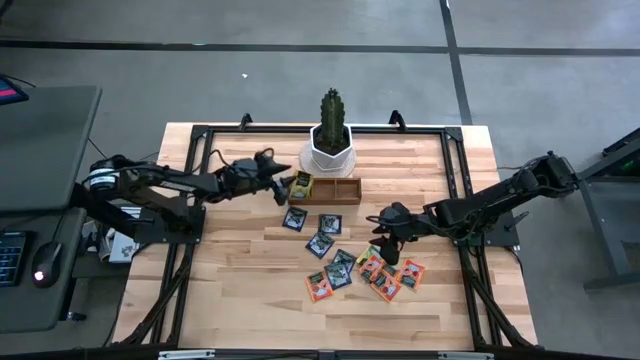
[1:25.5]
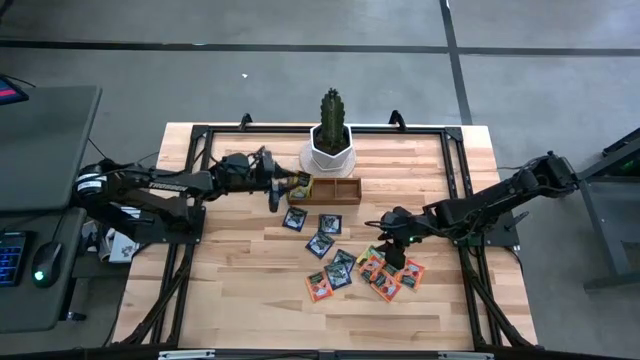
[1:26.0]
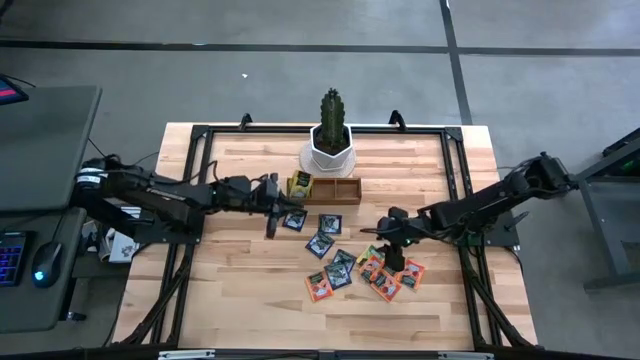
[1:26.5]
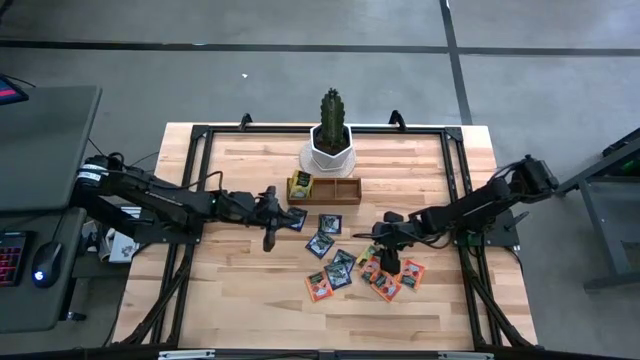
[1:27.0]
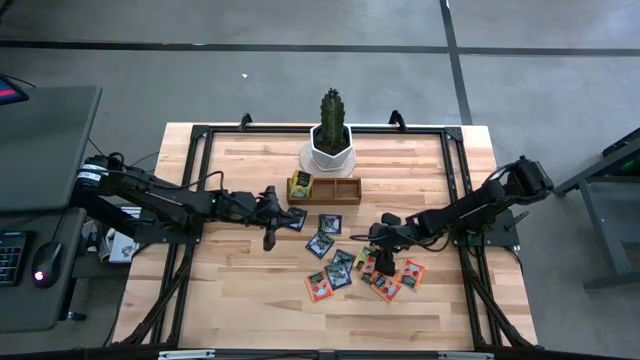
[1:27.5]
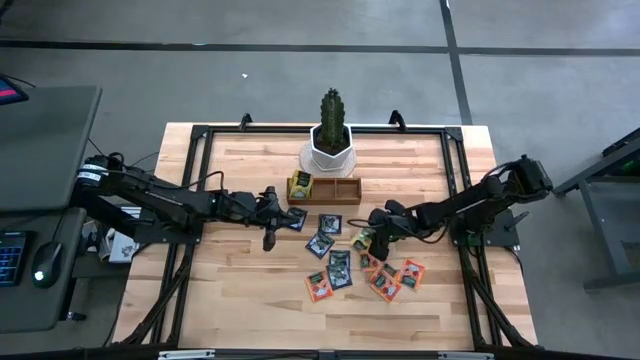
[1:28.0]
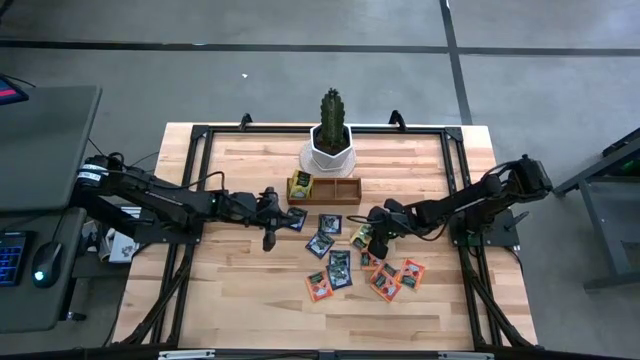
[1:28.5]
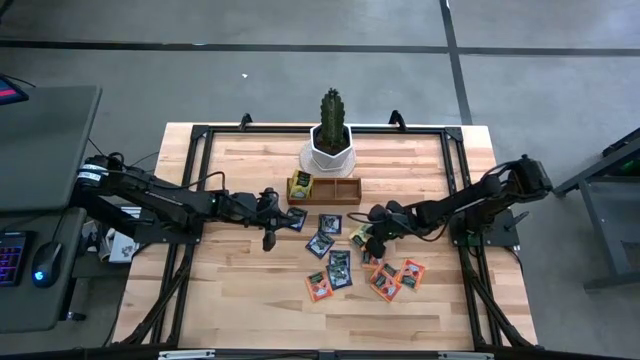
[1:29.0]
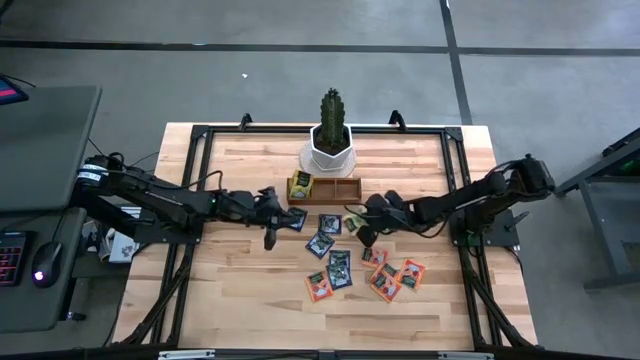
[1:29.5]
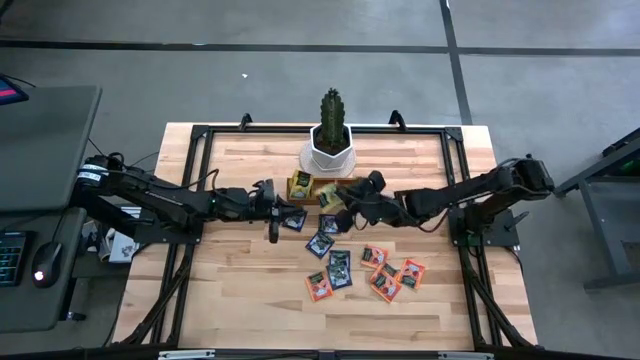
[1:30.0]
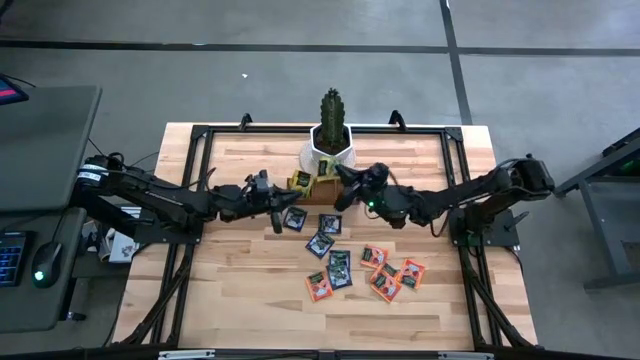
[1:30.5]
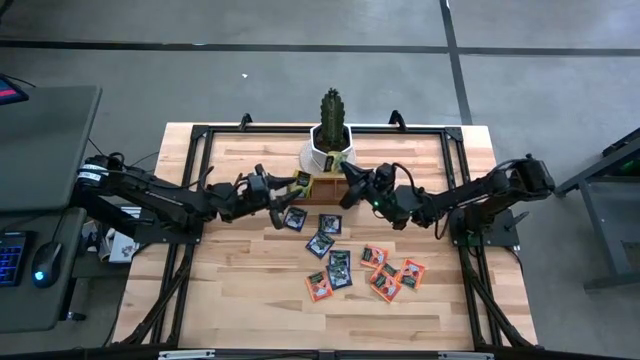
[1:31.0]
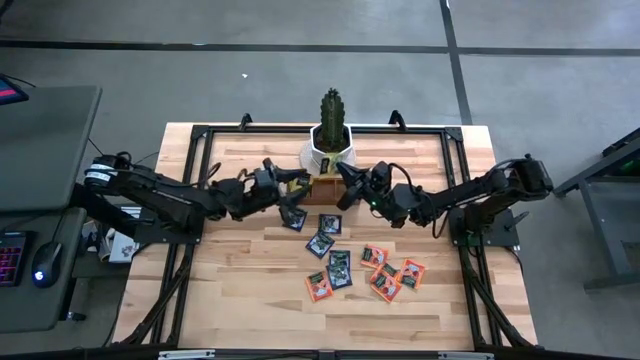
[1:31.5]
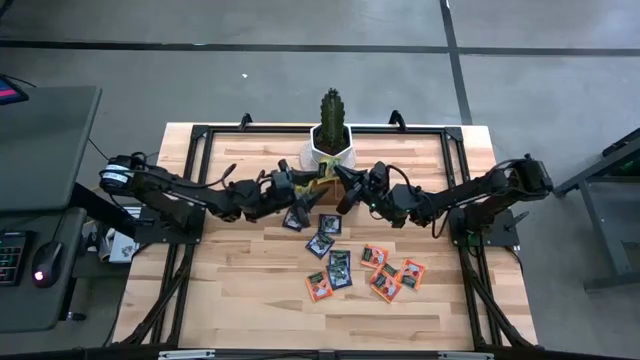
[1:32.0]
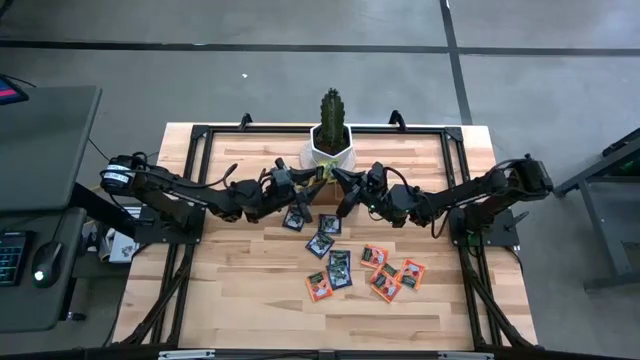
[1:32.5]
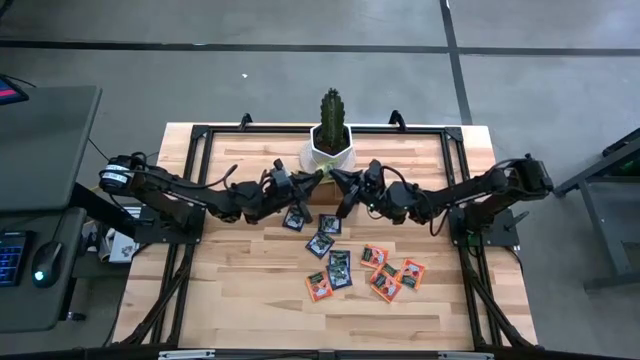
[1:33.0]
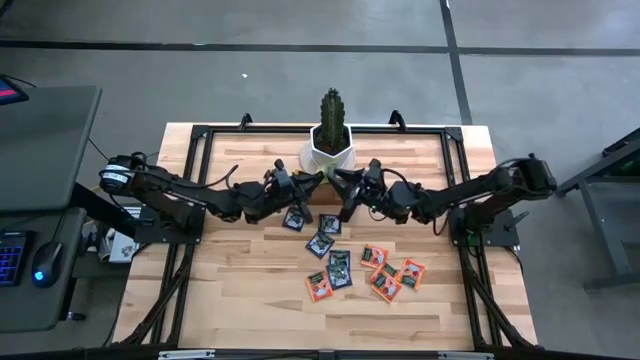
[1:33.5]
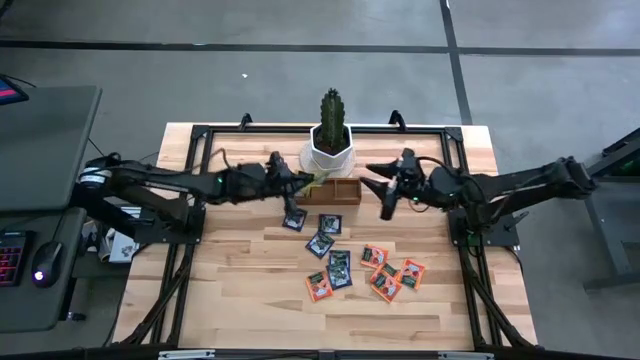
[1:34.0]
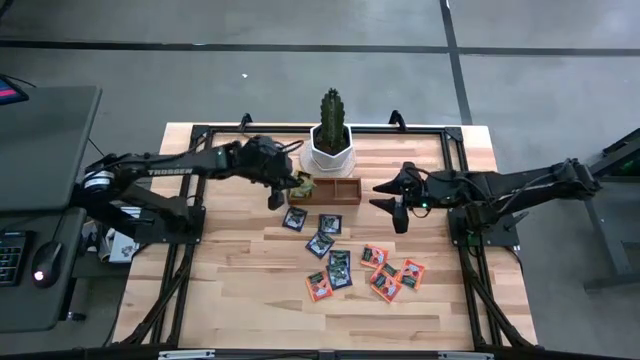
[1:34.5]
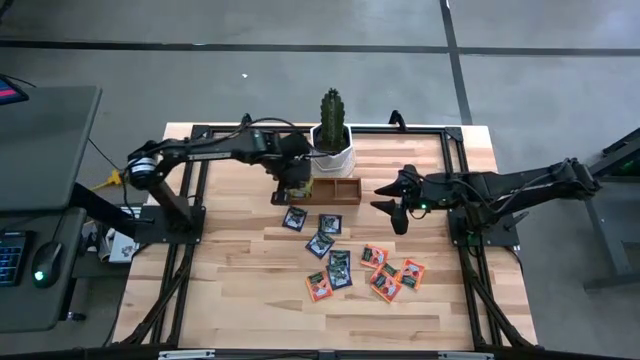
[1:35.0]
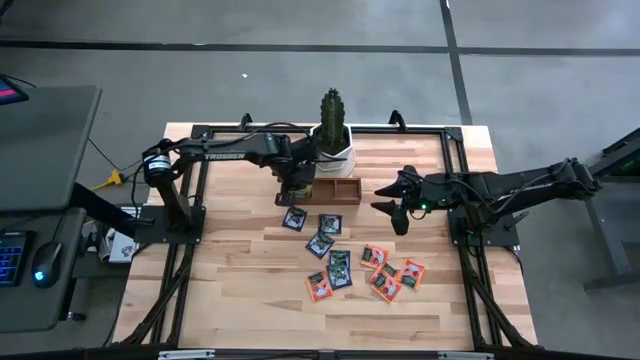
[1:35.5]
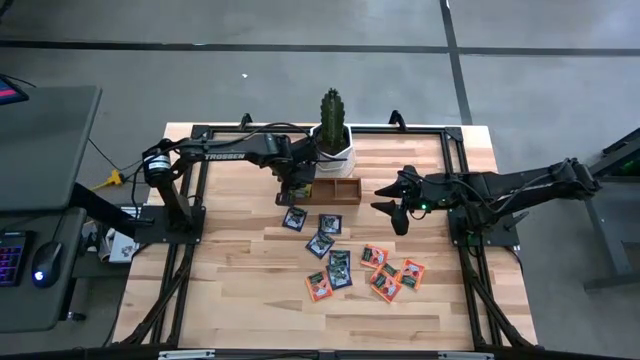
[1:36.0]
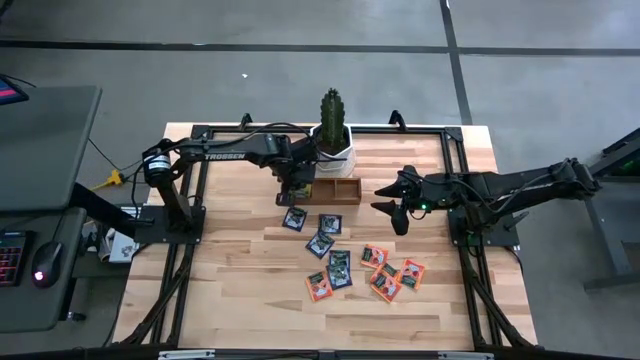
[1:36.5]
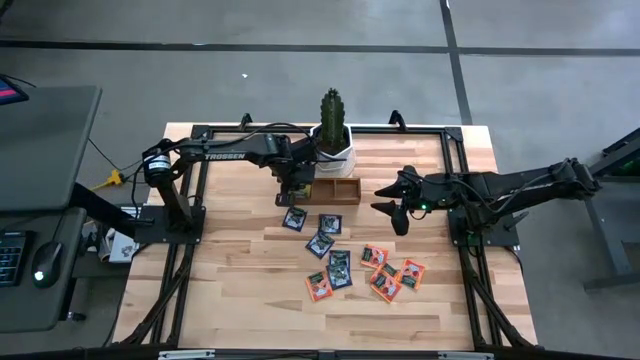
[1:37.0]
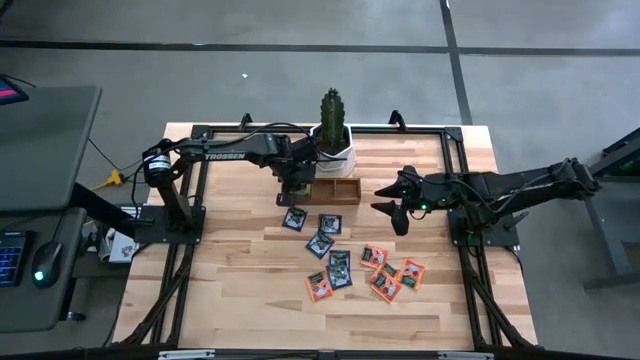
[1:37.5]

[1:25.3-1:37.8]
Task: Pick & Place Tea
Put the yellow tea bag into the left section of the wooden organizer

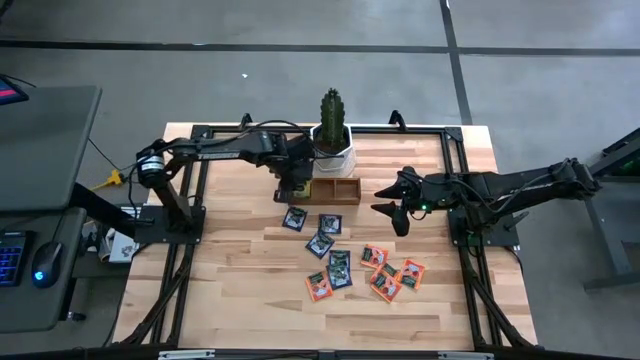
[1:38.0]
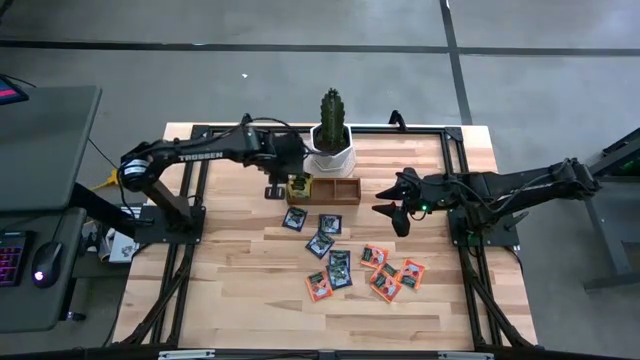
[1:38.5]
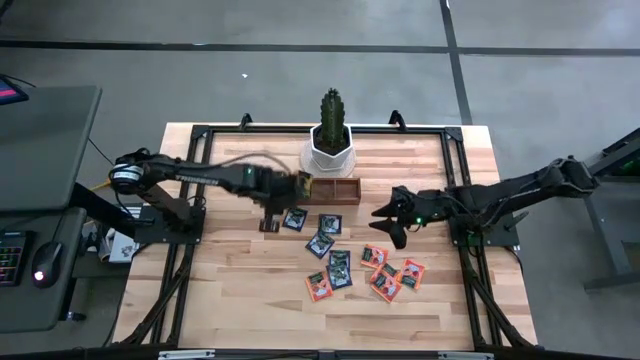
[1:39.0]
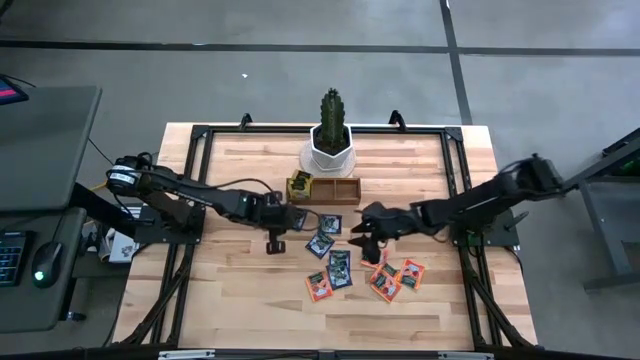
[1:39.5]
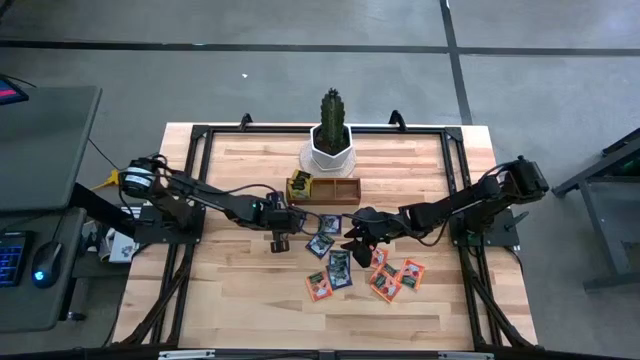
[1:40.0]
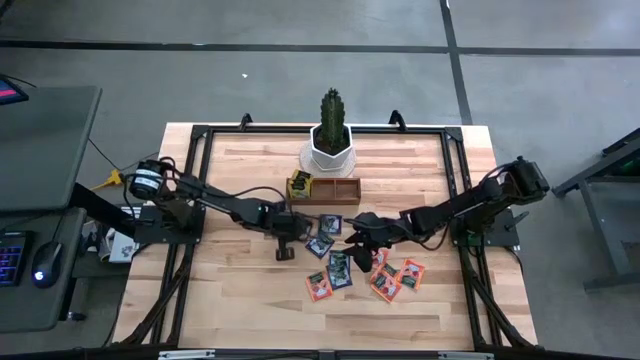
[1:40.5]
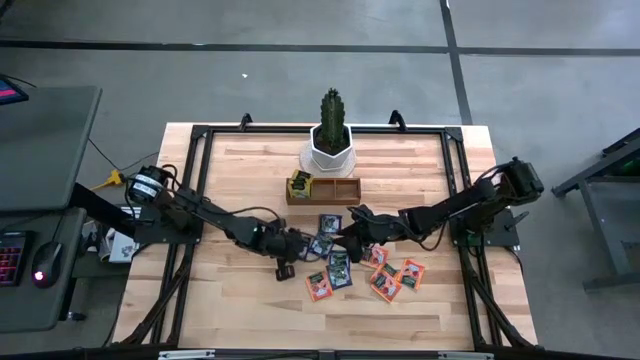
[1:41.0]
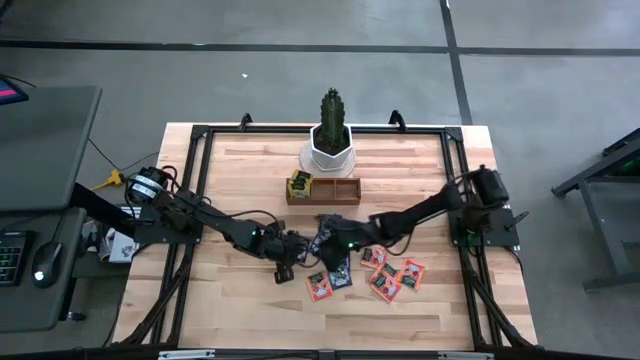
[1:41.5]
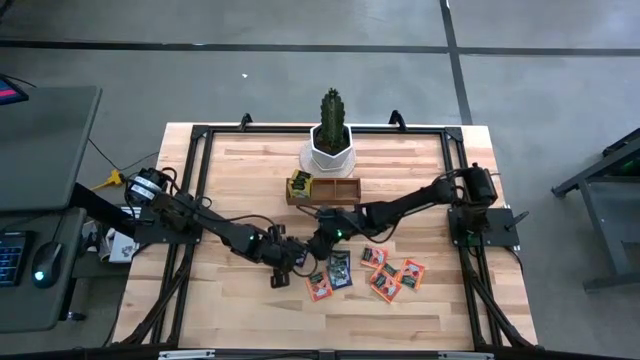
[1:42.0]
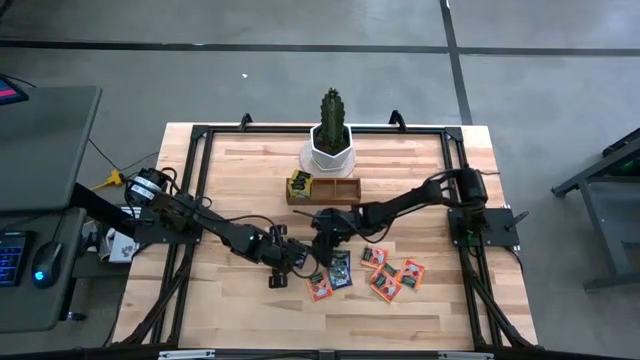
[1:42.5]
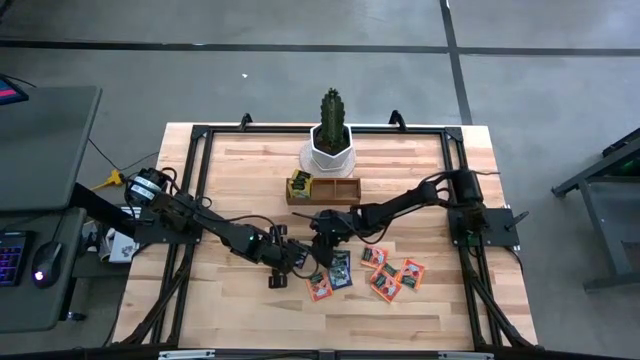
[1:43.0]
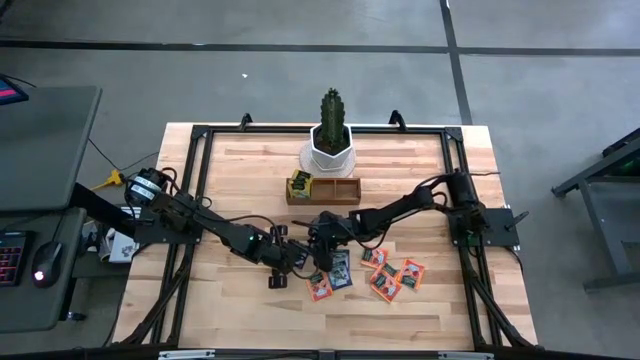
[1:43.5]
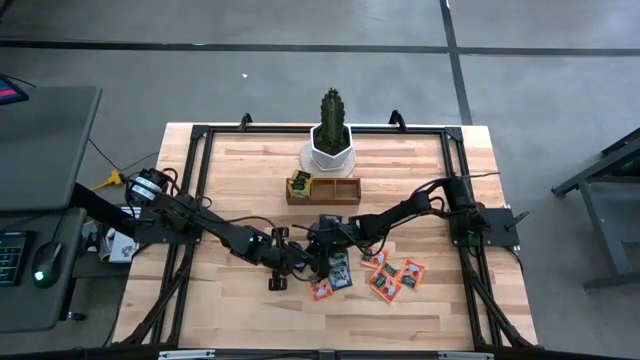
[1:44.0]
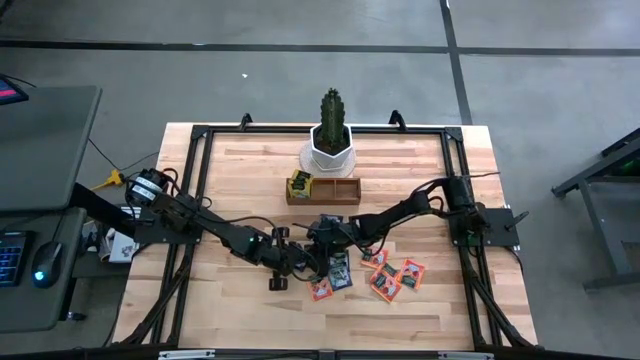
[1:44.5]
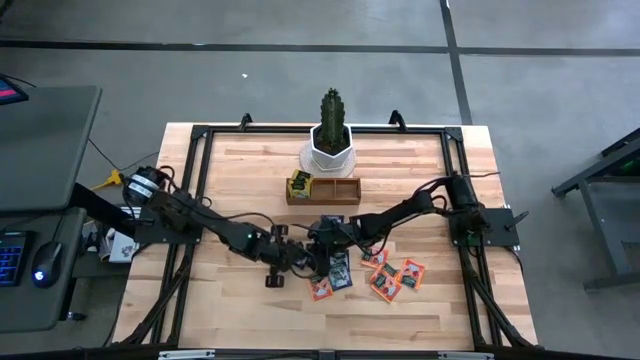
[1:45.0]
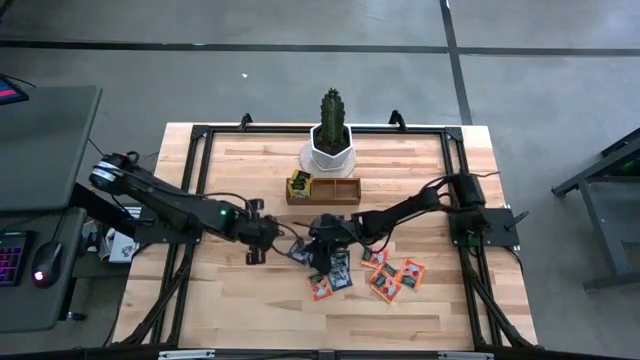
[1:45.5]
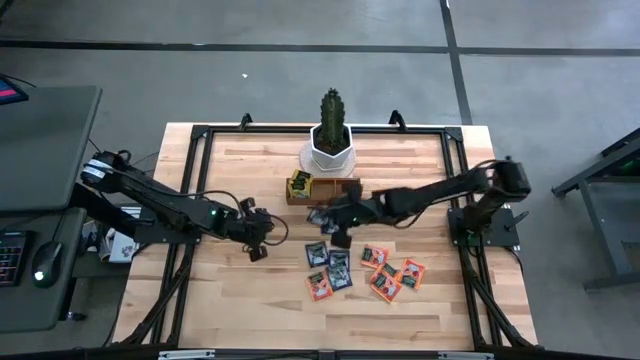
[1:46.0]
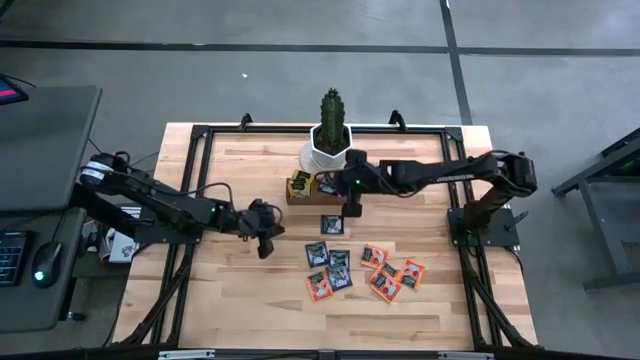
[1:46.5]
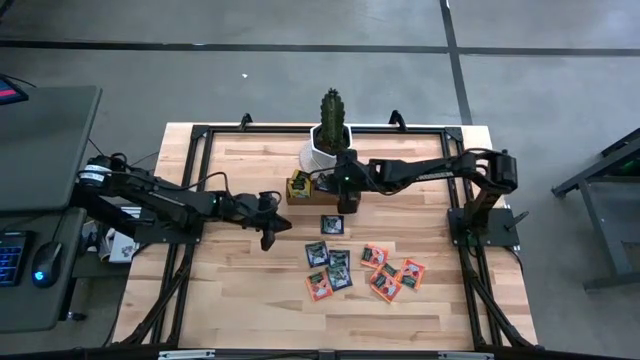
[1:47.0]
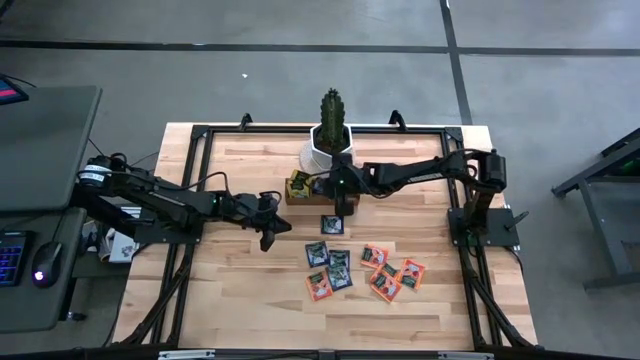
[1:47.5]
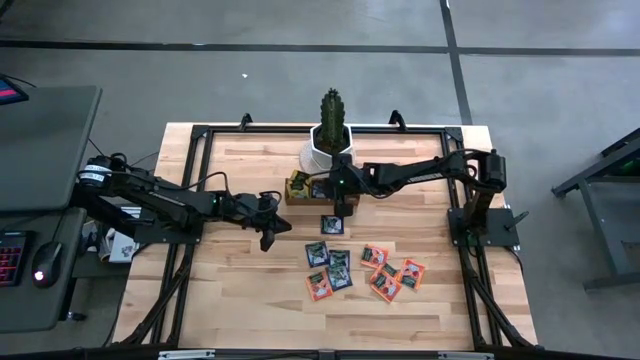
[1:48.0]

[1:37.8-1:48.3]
Put the purple tea bag into the middle section of the wooden organizer
